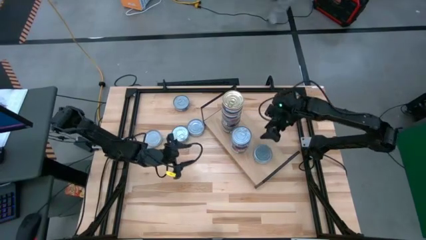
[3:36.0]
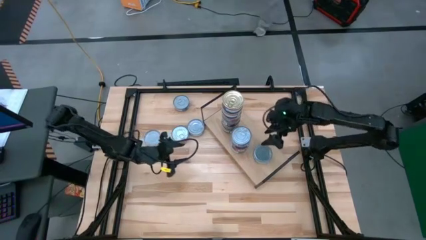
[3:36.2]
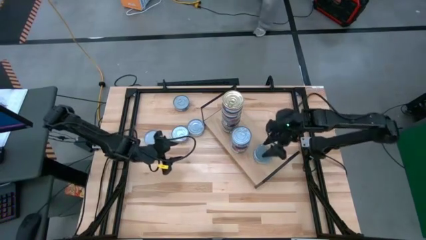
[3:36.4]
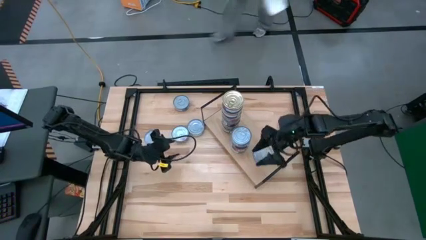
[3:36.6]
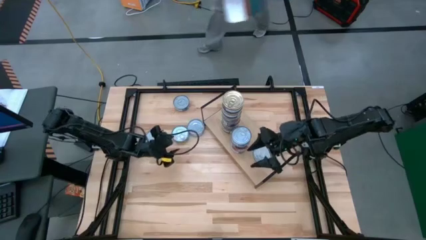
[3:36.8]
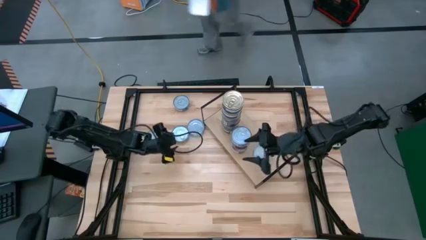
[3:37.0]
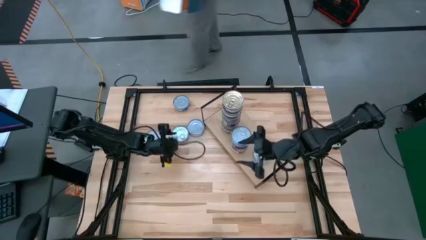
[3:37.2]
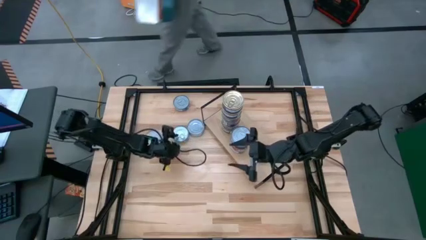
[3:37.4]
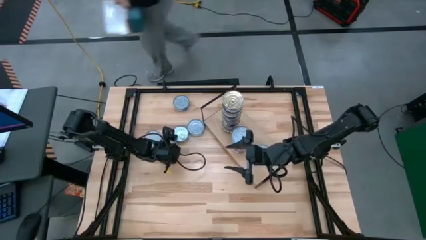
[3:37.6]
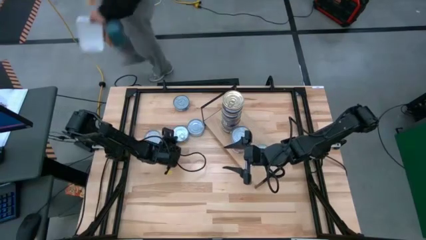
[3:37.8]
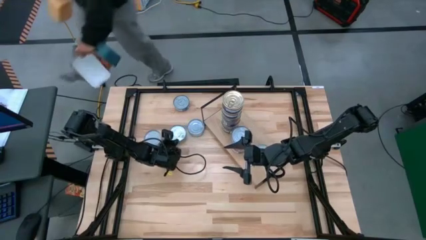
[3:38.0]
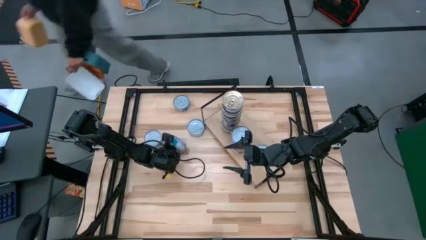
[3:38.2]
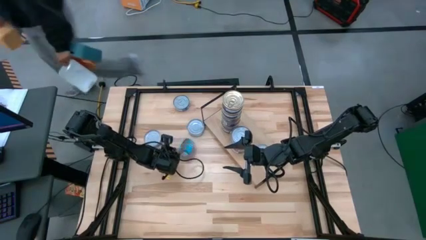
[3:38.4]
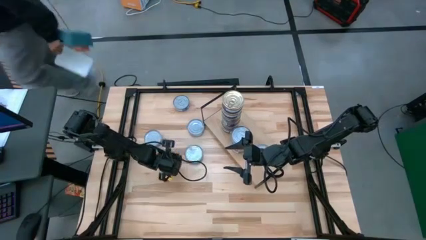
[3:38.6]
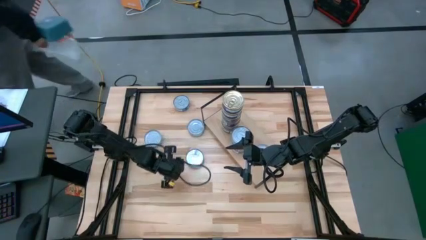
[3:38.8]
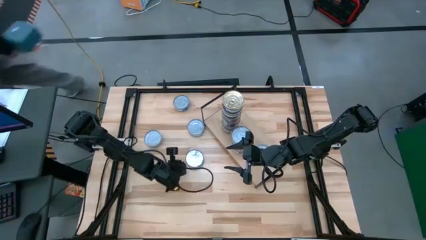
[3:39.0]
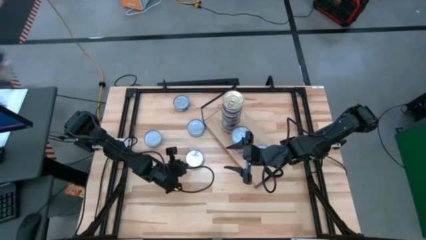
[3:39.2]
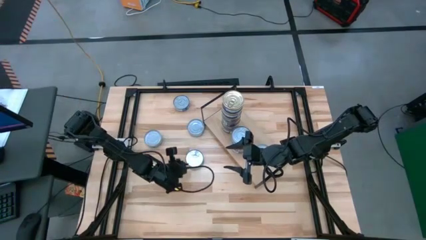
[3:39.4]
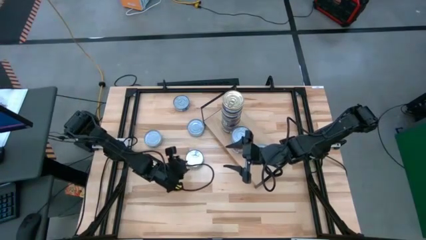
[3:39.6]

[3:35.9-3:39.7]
Task: Stack canned seafood by type on shelf
Stack the blue tuna can on top of the blue tuna can

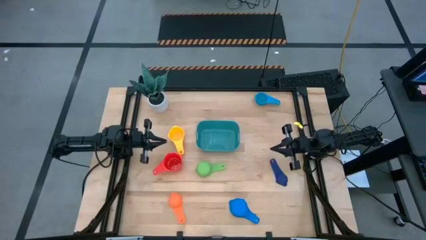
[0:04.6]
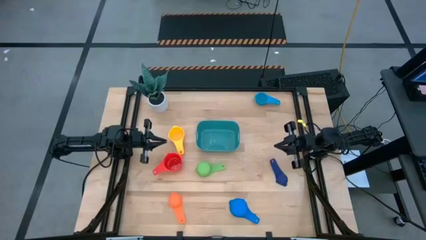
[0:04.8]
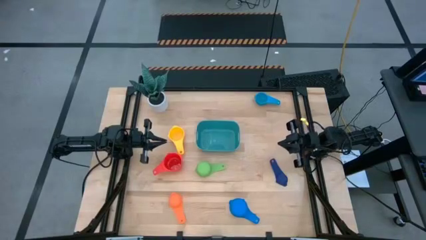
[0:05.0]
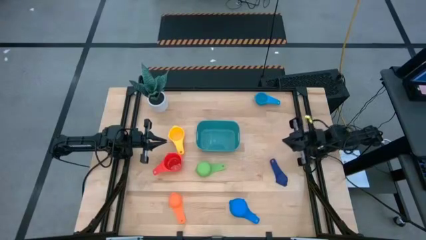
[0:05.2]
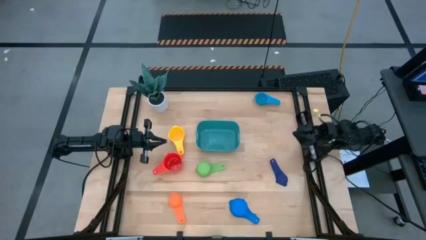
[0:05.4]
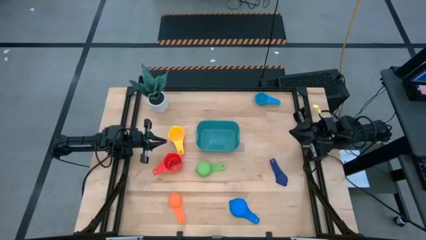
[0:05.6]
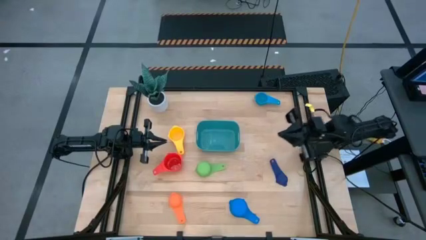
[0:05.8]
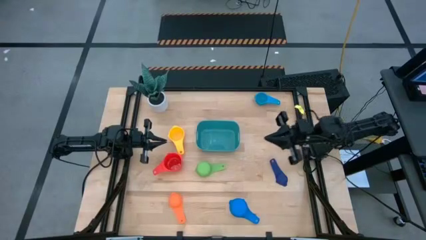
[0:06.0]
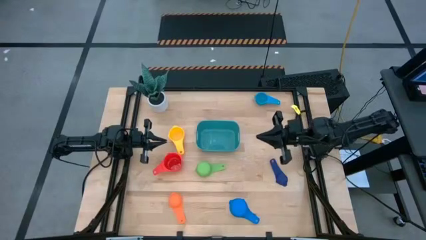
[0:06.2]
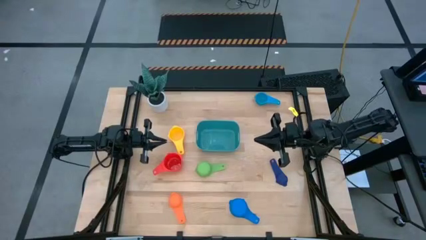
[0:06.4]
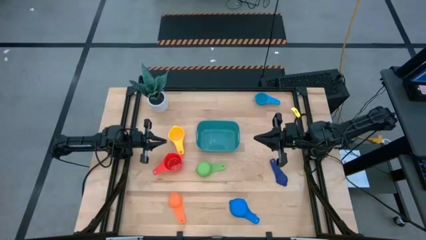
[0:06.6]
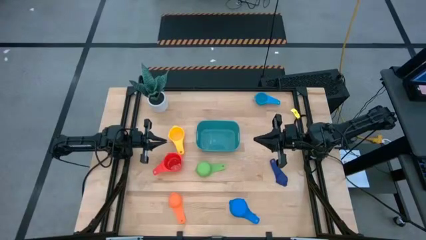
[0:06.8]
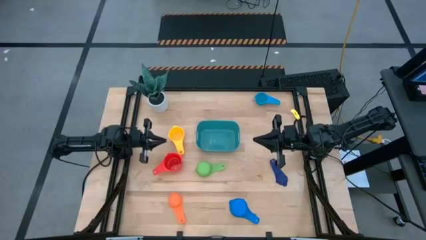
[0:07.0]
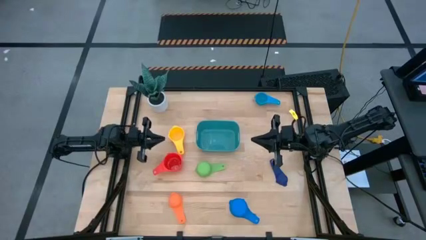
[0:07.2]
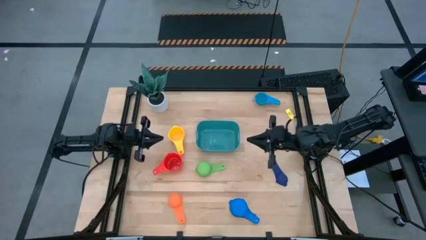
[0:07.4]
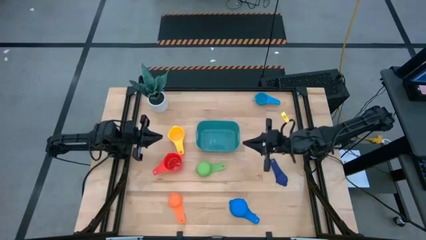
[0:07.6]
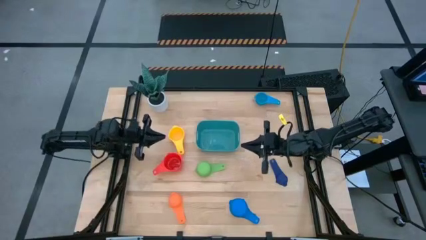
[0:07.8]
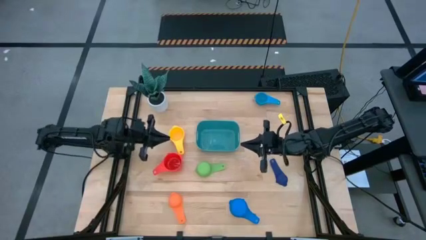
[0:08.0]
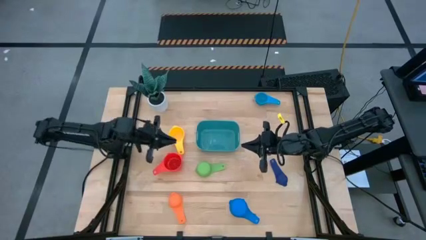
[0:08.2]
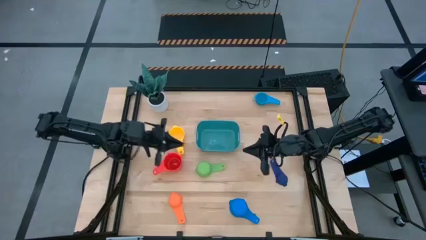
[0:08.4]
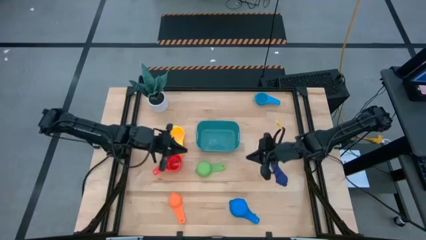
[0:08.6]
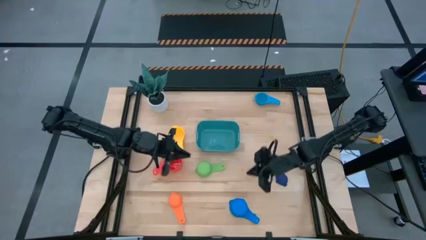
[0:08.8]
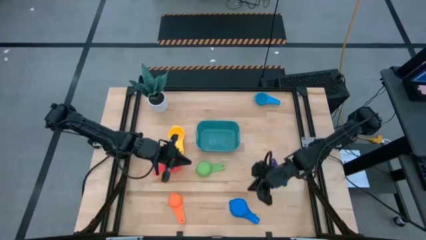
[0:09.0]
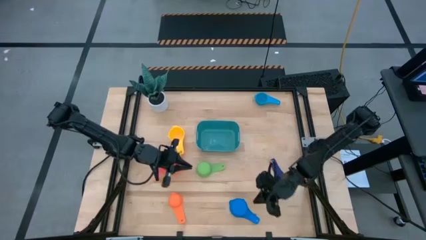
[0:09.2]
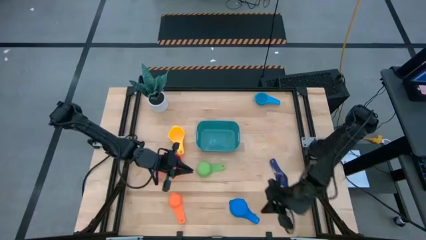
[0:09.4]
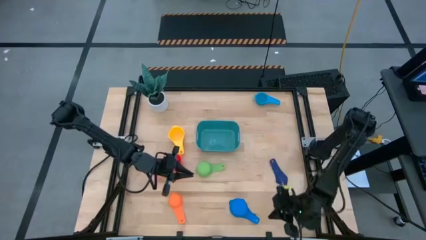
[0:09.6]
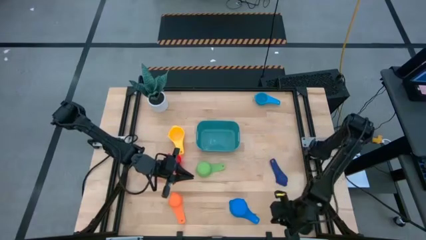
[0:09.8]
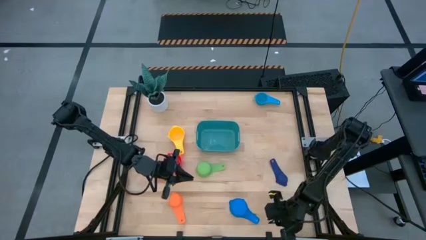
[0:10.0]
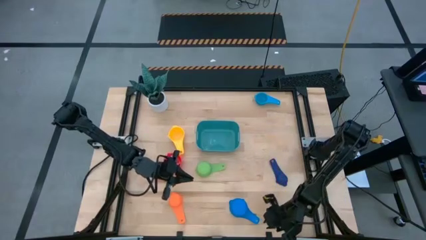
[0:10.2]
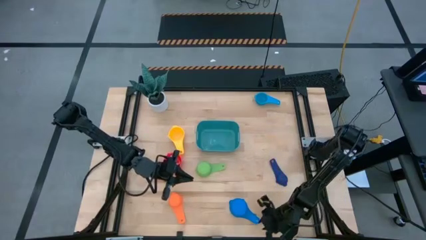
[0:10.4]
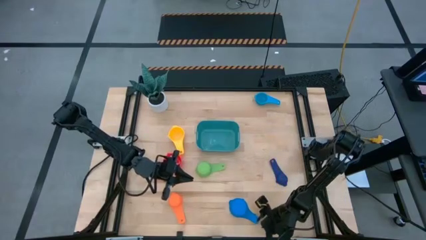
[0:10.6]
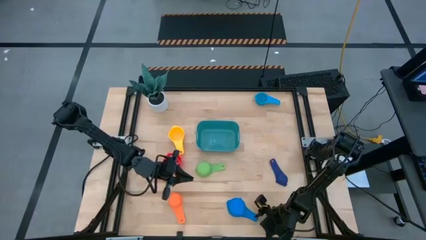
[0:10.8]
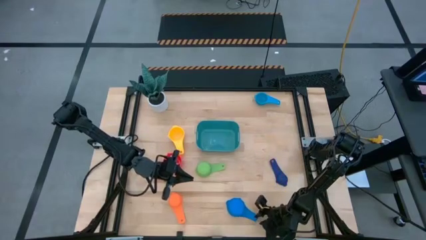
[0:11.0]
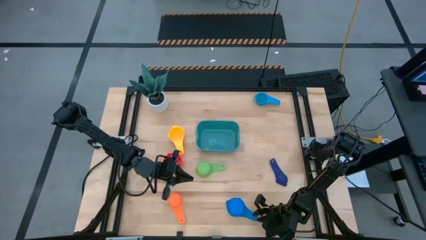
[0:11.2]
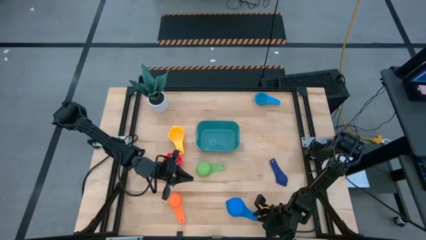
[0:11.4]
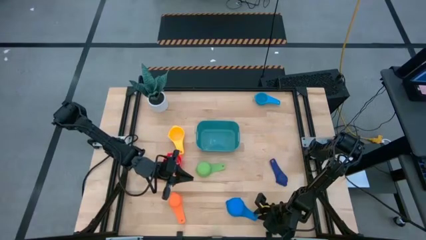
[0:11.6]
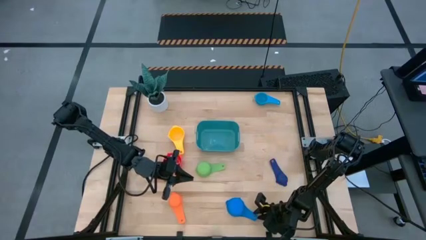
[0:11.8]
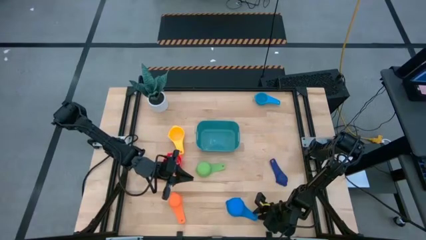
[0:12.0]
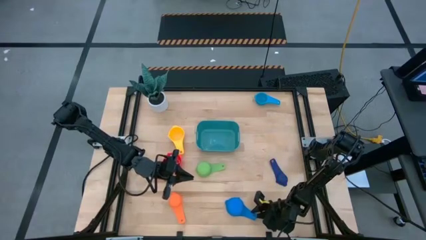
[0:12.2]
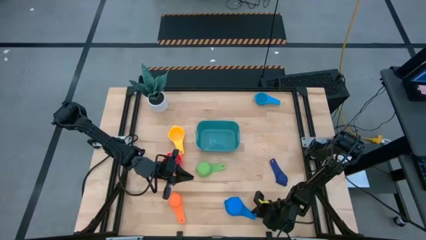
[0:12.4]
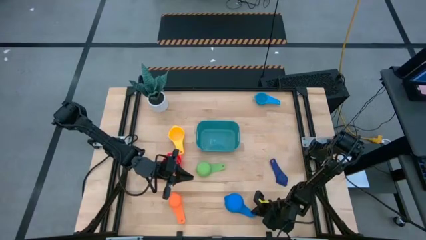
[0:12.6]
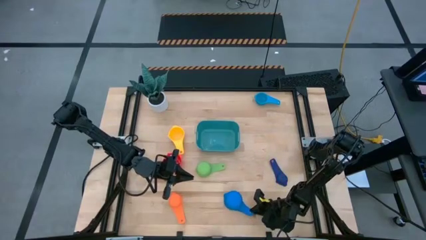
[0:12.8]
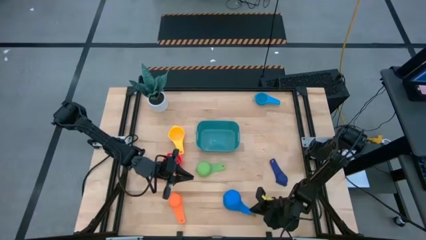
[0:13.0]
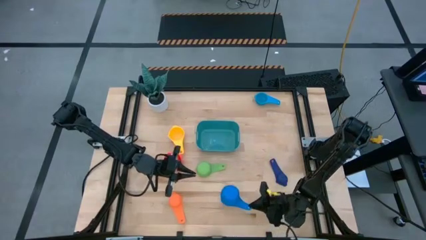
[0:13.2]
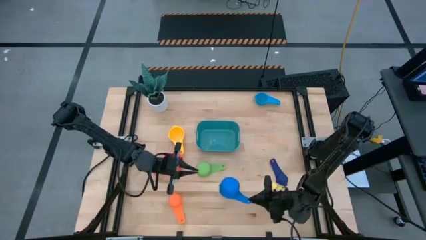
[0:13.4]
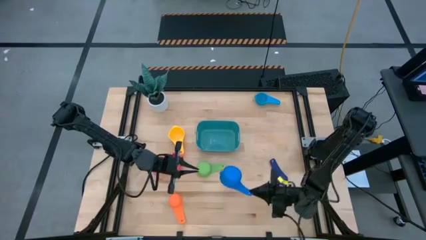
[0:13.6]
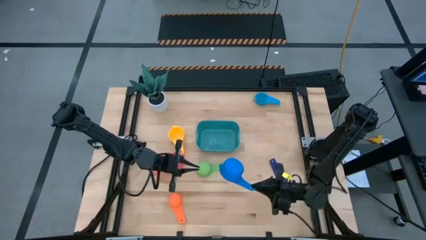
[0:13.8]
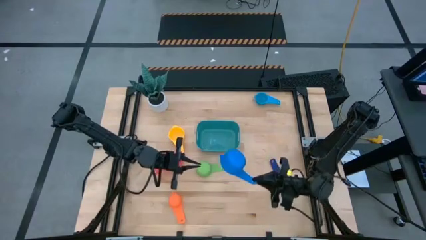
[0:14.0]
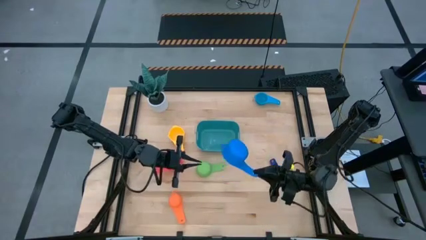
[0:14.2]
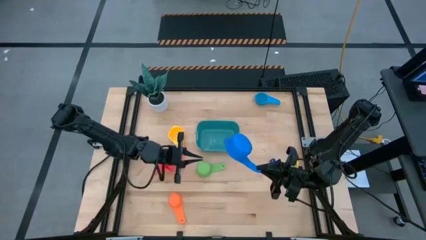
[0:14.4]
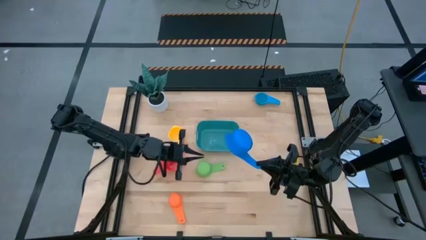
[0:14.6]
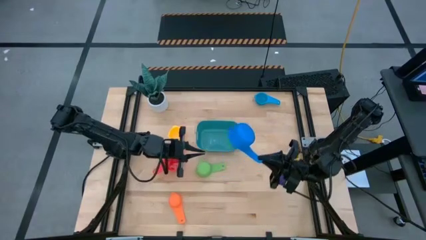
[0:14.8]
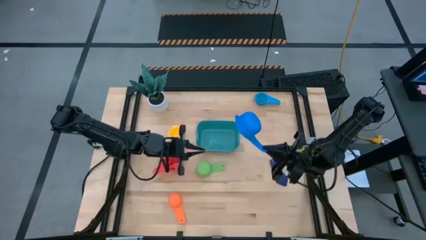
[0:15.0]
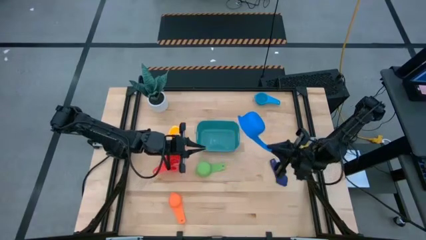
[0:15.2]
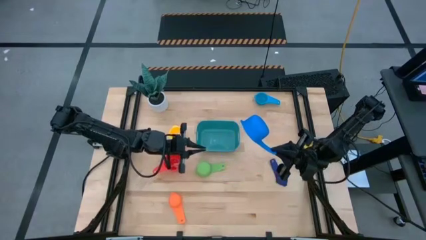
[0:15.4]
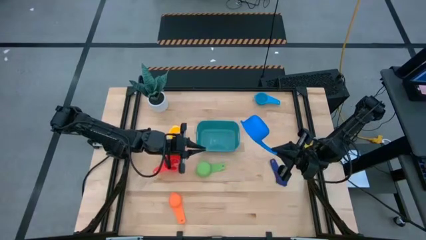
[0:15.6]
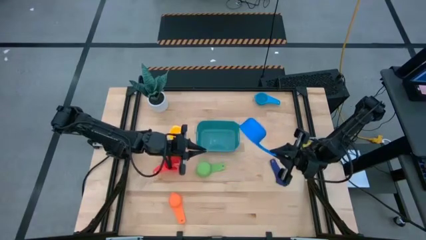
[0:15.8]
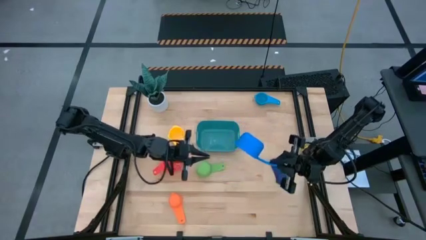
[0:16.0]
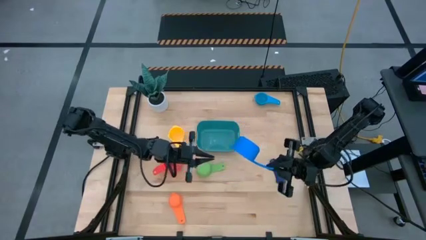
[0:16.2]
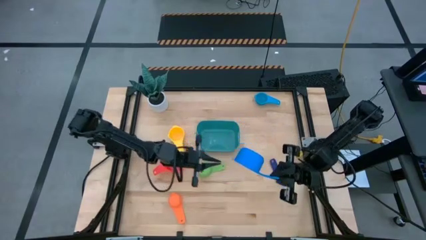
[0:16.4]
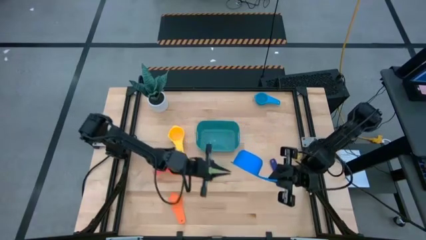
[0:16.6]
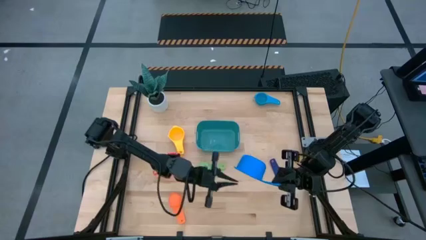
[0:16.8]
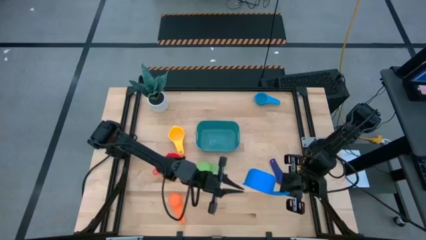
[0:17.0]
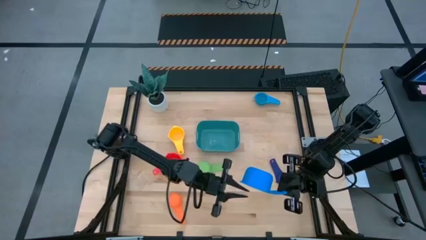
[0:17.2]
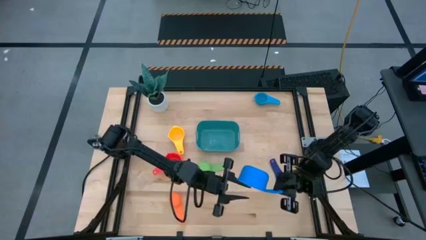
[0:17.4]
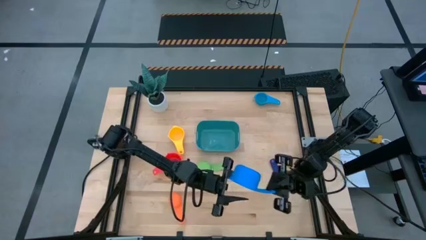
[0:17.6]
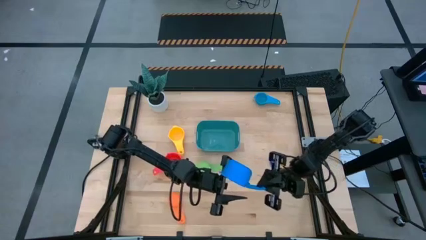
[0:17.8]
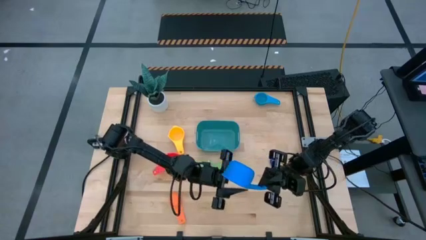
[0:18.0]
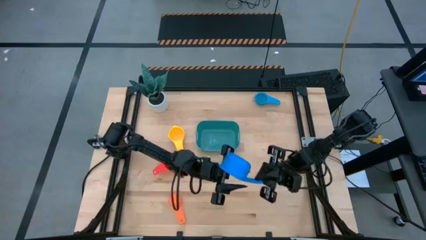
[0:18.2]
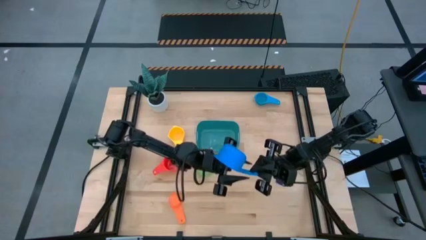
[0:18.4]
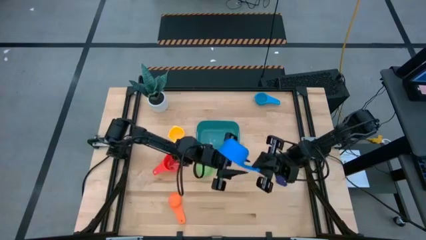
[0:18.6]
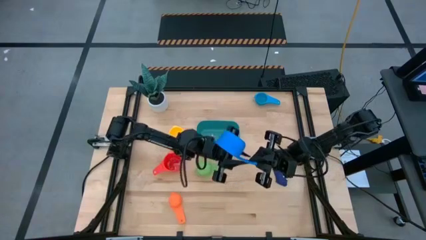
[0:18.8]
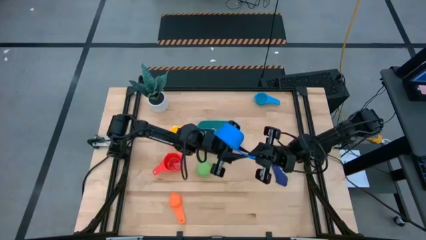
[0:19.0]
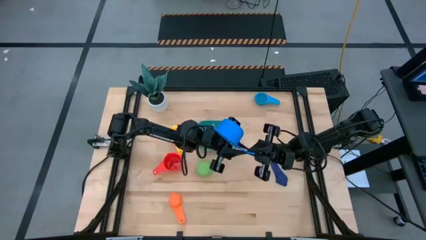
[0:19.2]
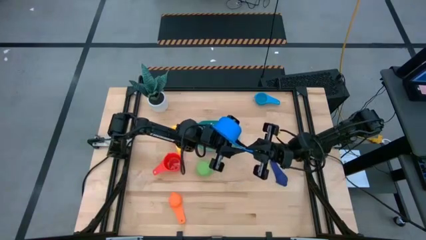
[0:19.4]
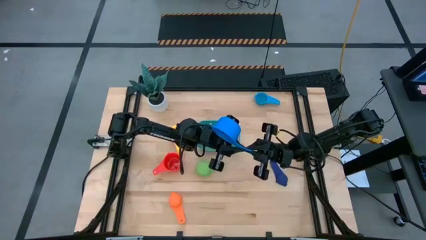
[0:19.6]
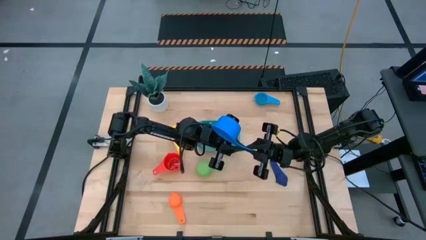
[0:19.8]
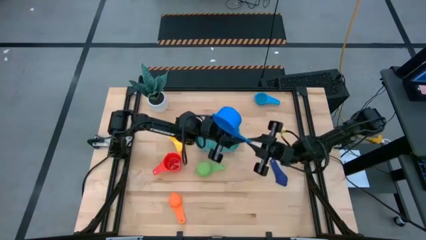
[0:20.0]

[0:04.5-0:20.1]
Task: Nest measuring cups in basket
Stack the blue measuring cup onto the red measuring cup
